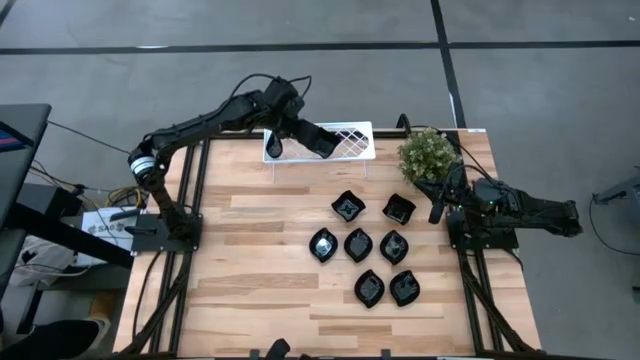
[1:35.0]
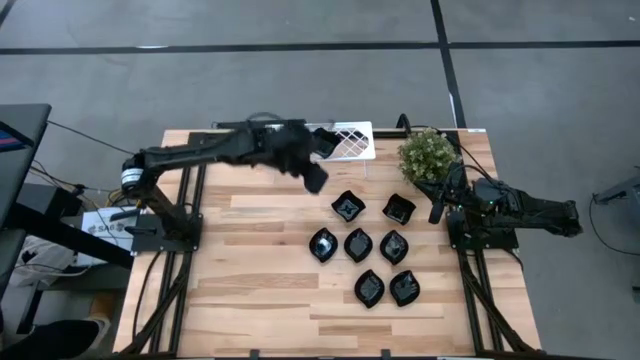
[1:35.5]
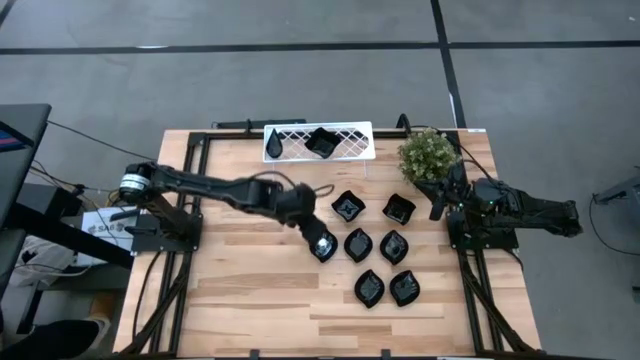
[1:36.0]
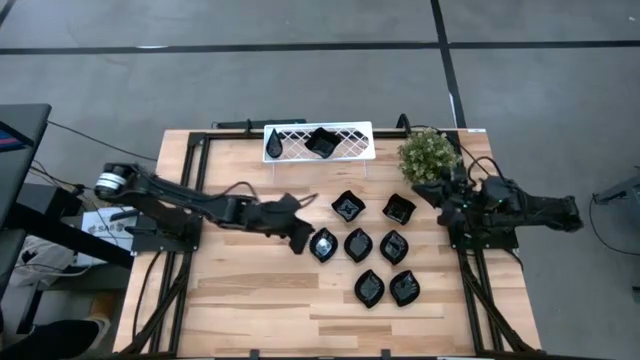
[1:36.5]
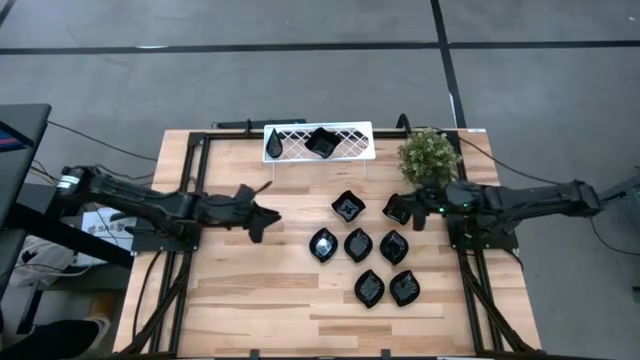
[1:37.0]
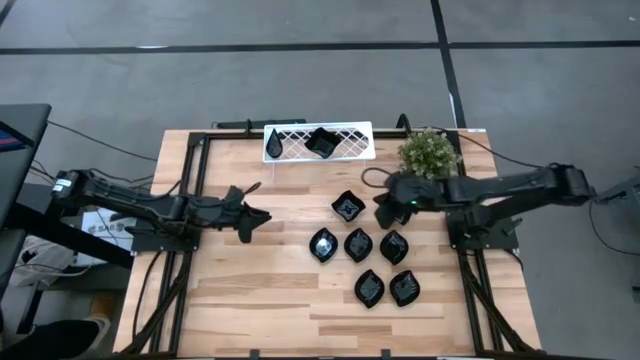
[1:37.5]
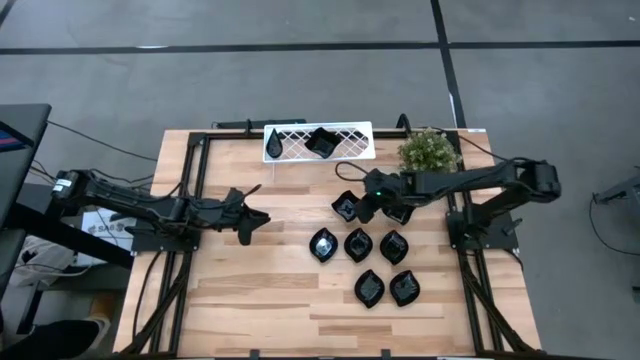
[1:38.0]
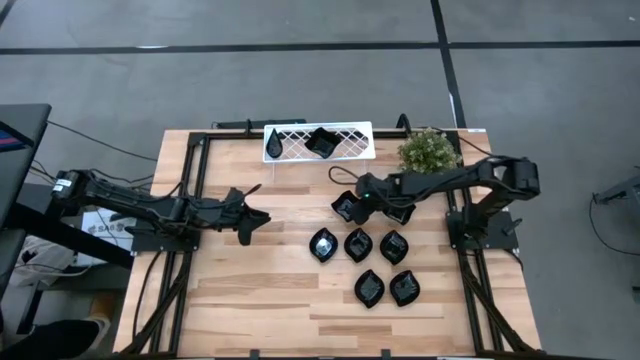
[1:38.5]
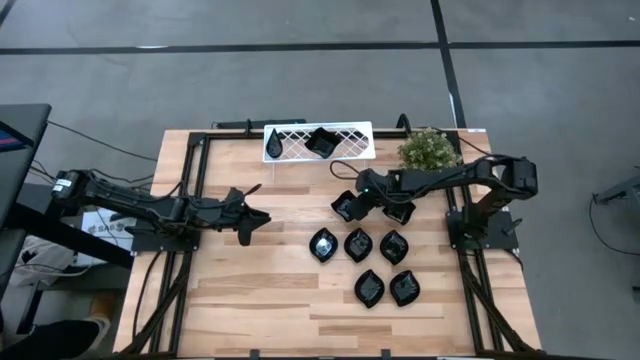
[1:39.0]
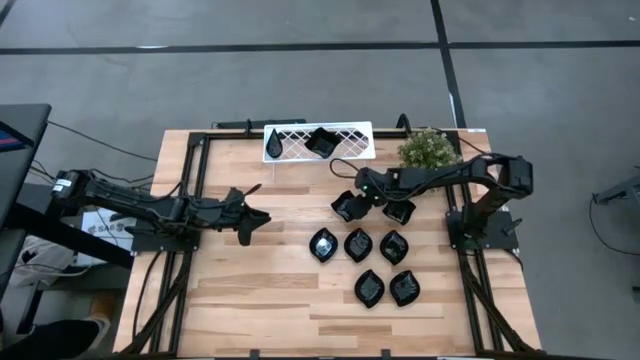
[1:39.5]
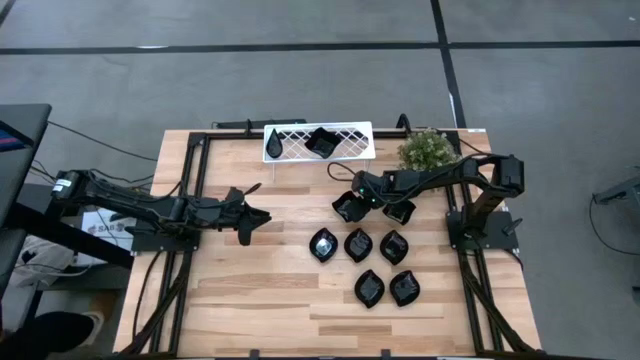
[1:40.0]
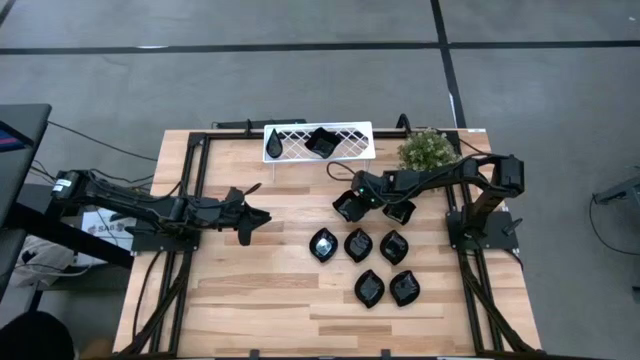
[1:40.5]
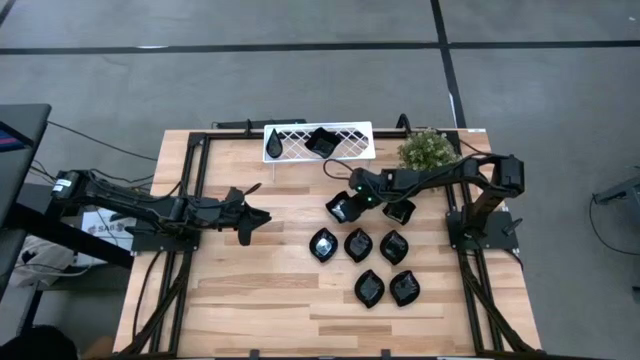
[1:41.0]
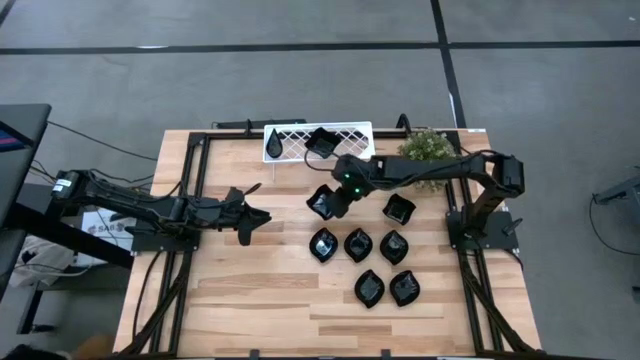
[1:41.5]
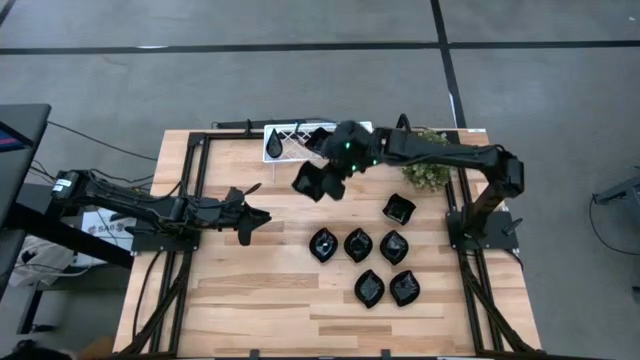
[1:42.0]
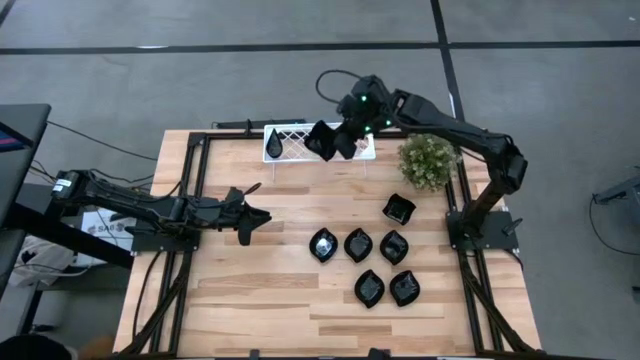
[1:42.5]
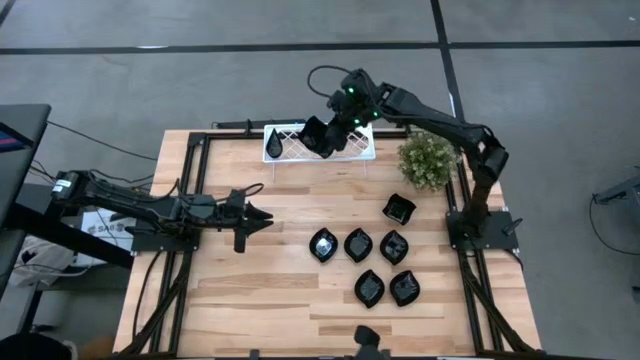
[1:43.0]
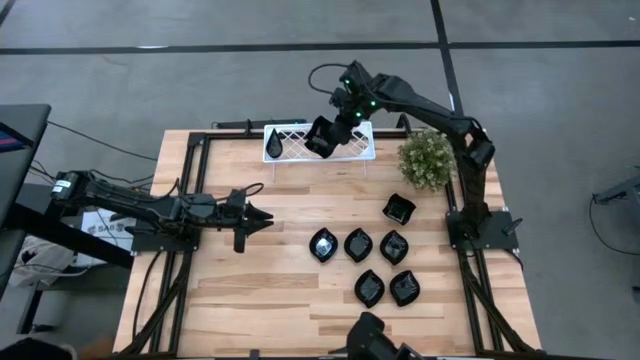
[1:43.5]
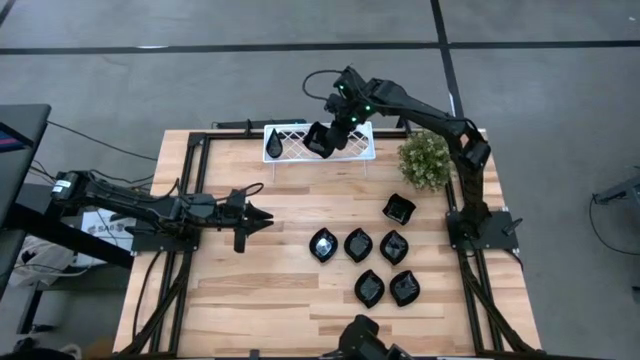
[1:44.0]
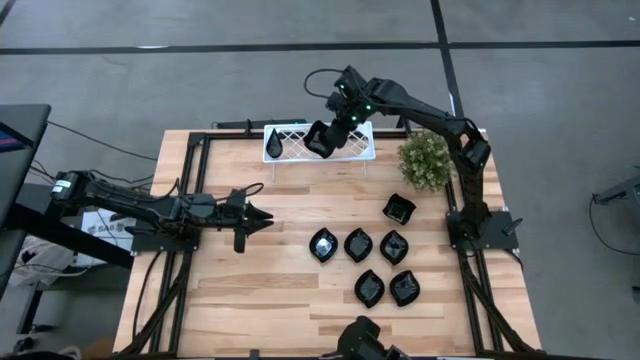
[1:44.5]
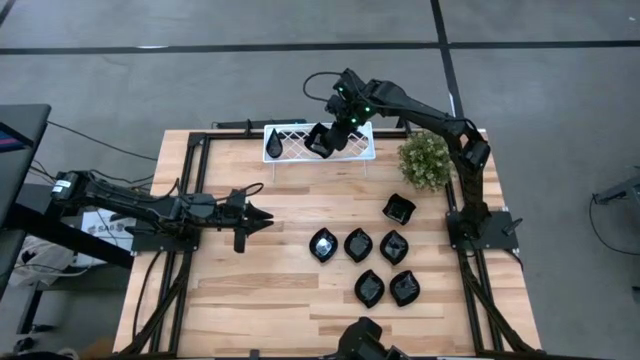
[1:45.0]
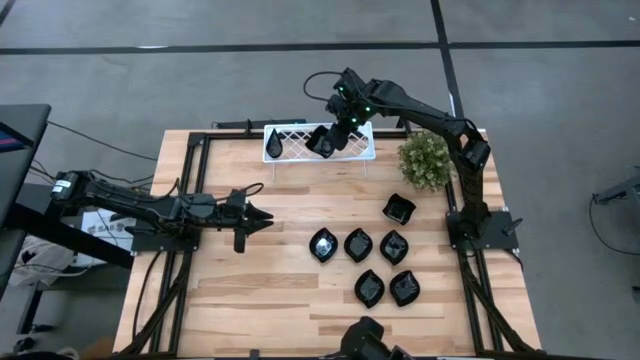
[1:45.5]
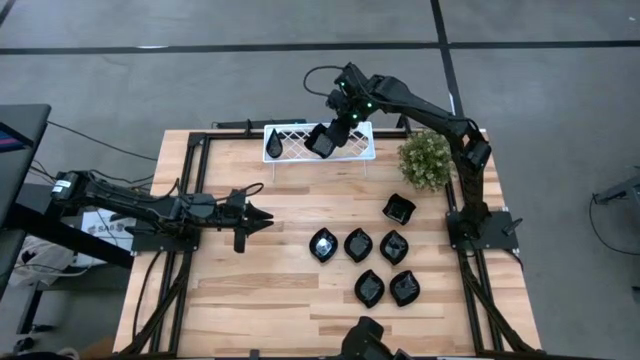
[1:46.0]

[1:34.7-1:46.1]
Task: Pick & Place Mini shaped plates
Stack the black distorted square plate on top of the black distorted square plates on the shelf

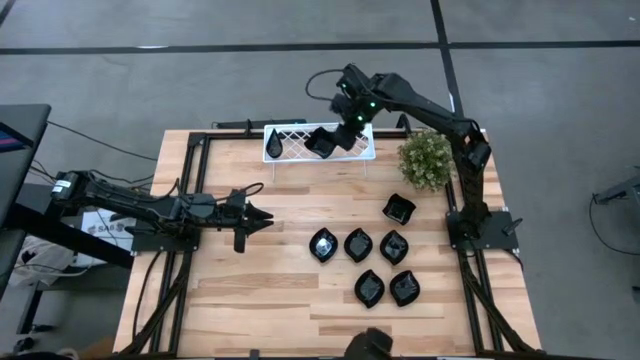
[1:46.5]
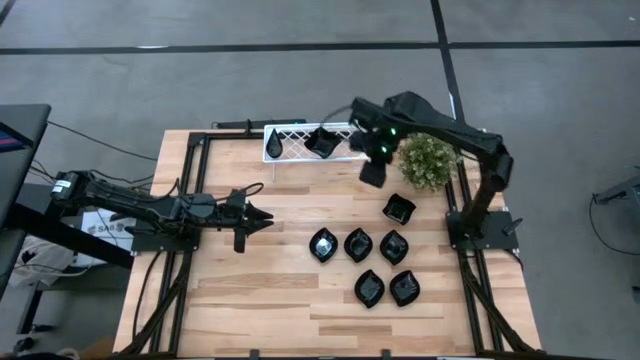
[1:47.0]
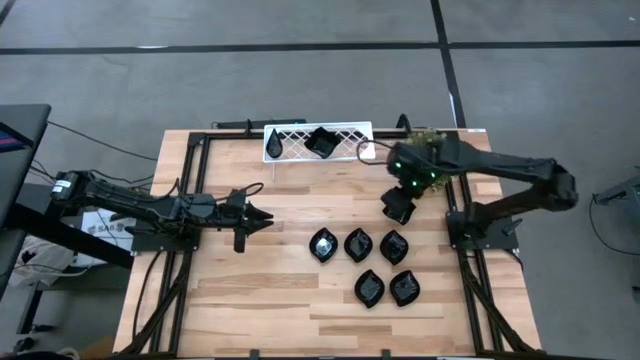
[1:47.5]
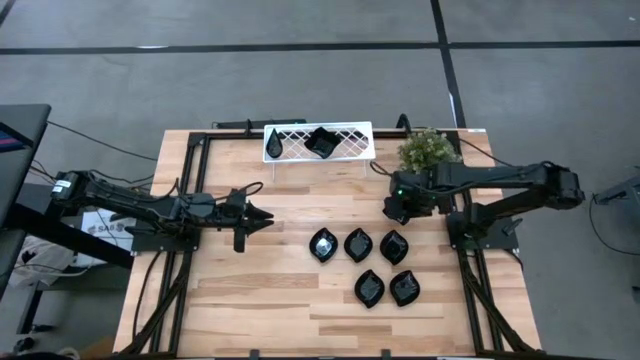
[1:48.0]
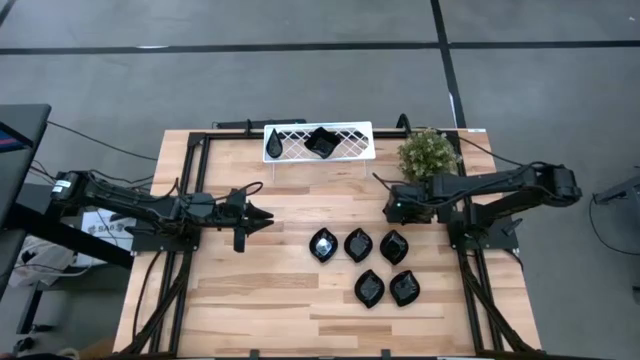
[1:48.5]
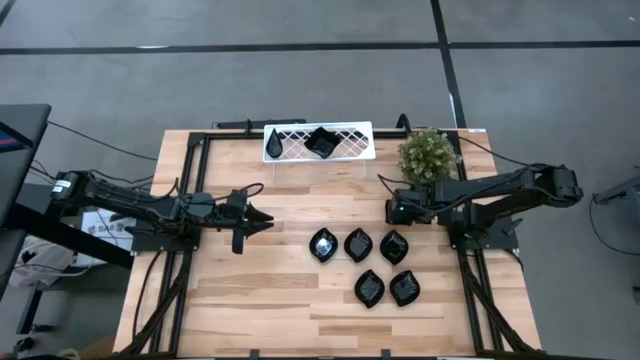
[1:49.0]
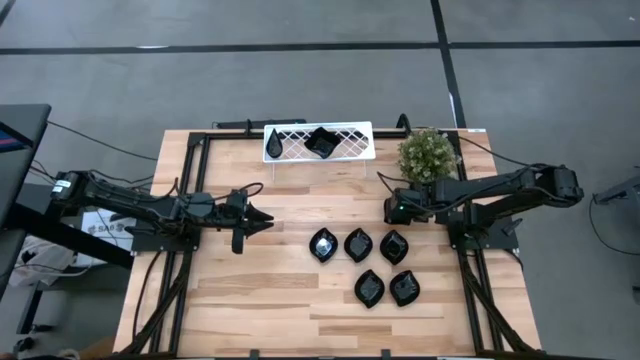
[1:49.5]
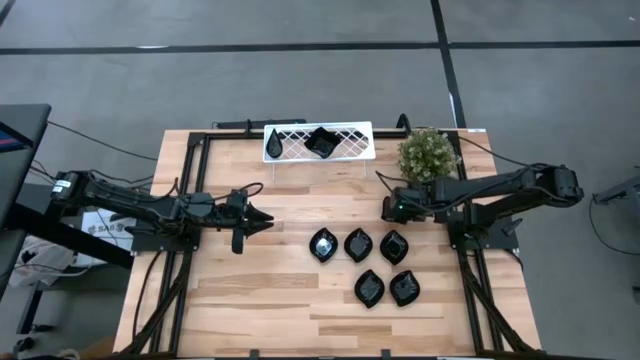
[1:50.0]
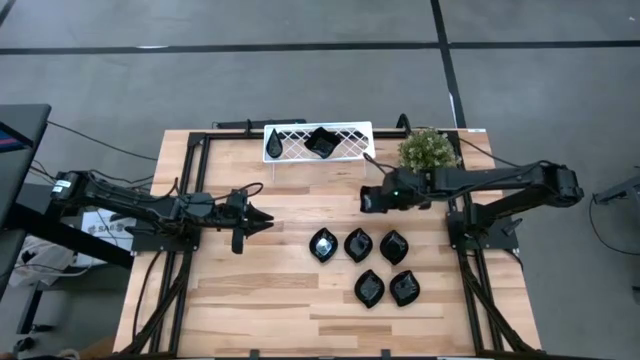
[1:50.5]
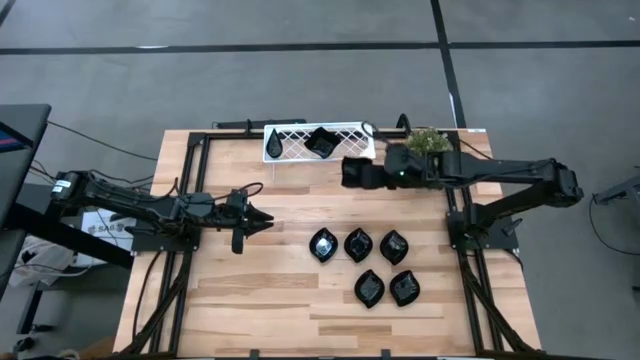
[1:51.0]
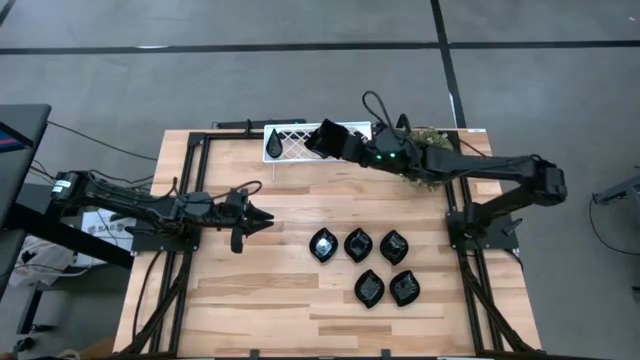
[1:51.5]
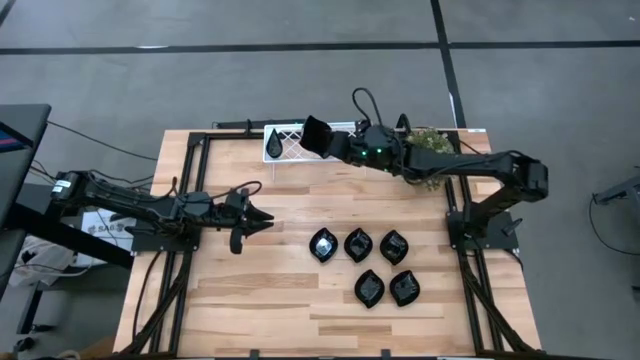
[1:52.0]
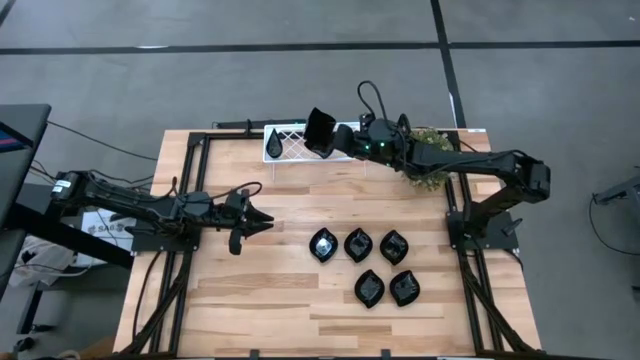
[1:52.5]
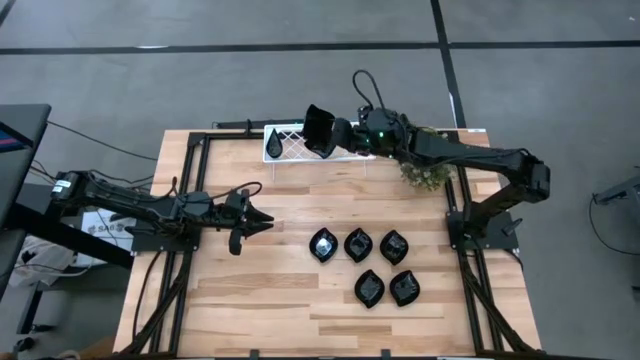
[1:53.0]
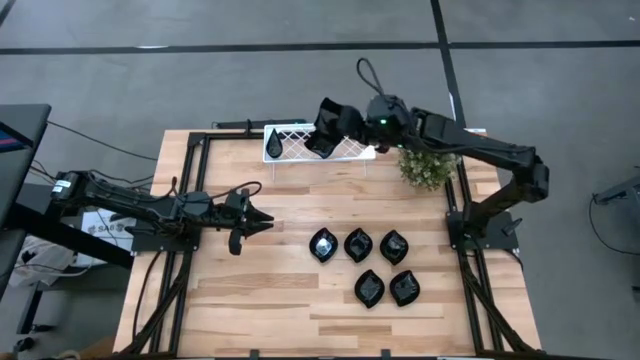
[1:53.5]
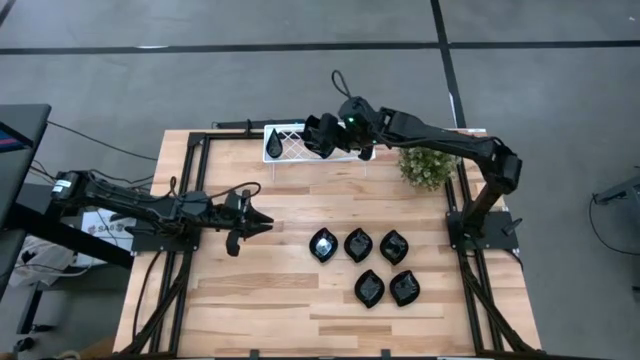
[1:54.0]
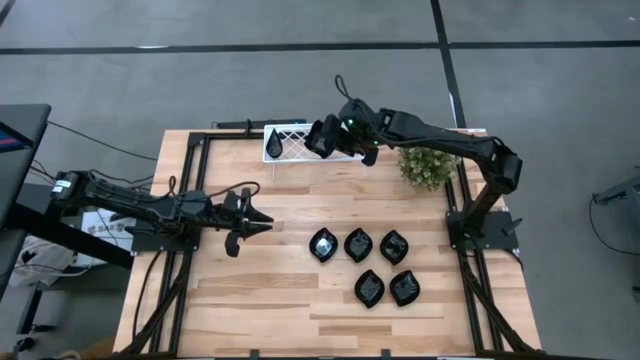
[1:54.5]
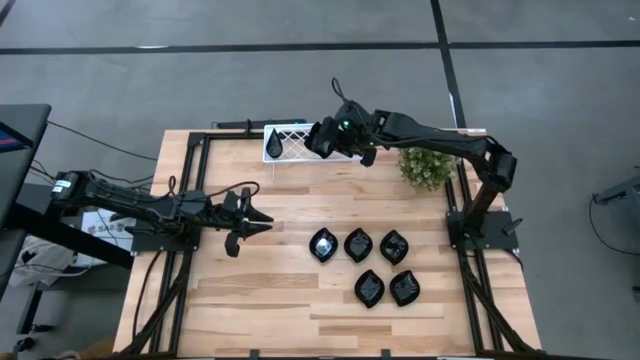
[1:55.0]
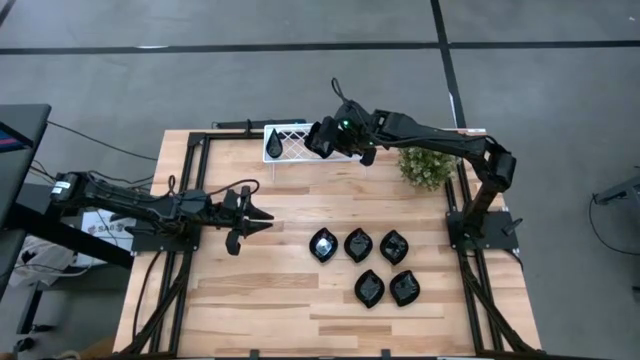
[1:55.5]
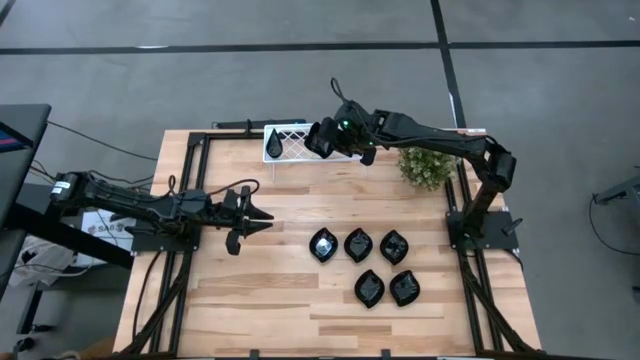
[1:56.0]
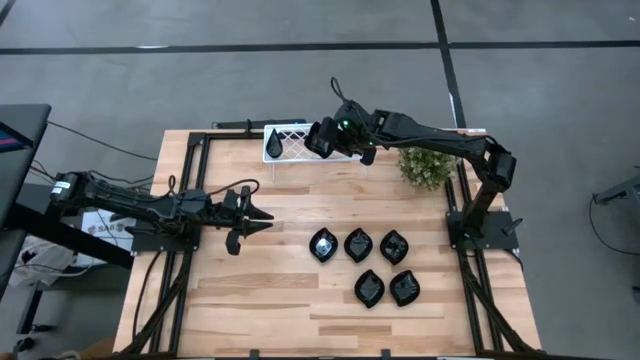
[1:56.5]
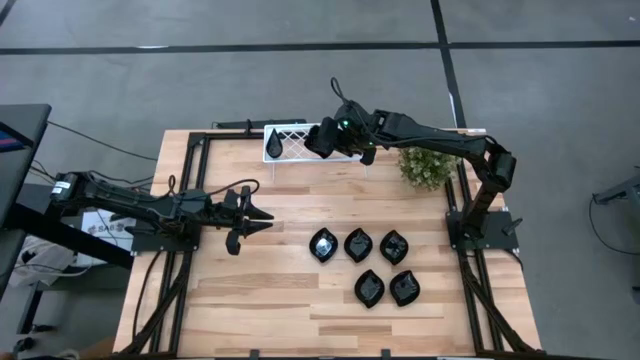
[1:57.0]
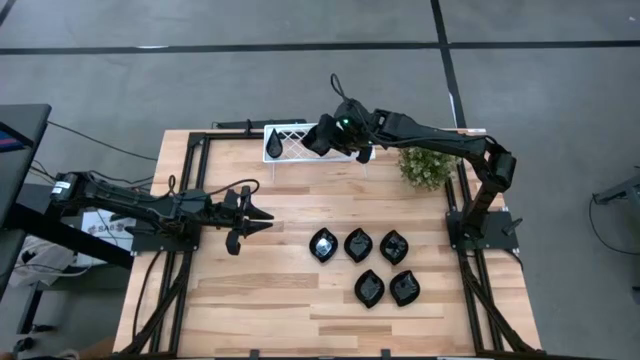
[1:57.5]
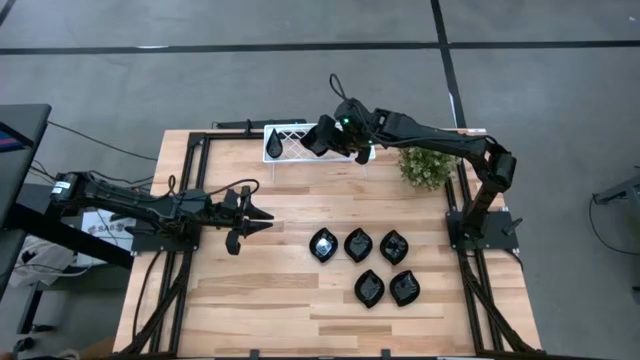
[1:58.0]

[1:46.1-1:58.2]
Stack the black distorted square plate on top of the black distorted square plates on the shelf
